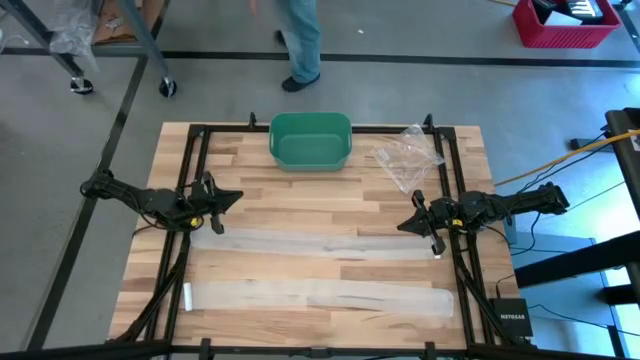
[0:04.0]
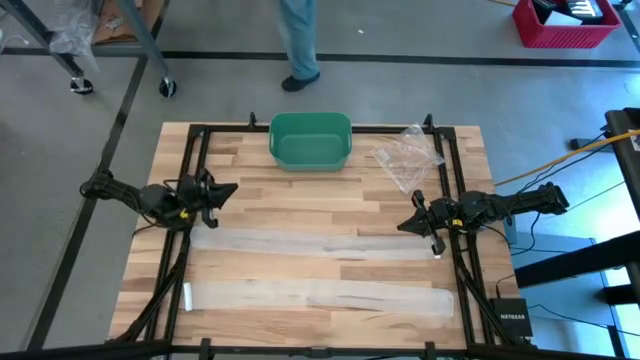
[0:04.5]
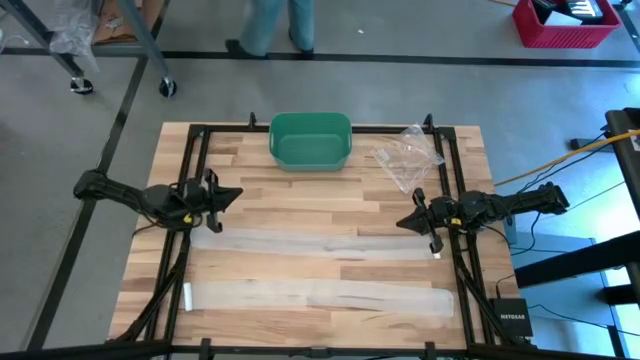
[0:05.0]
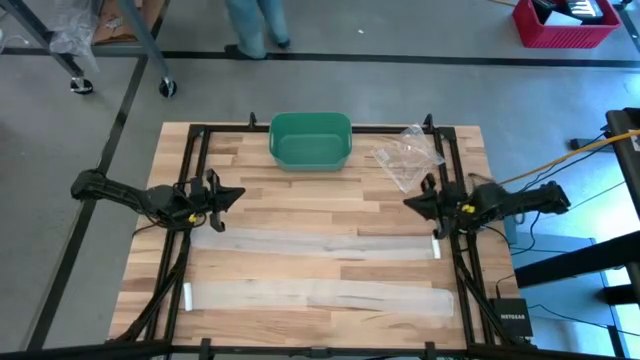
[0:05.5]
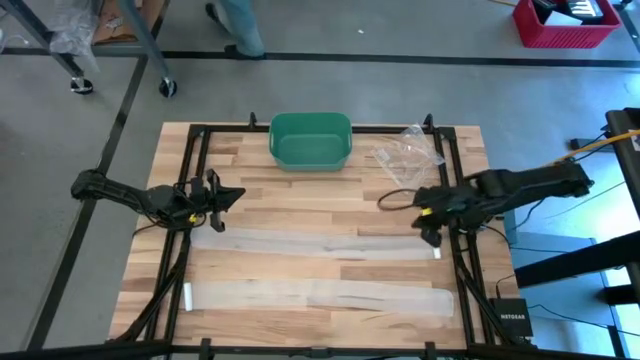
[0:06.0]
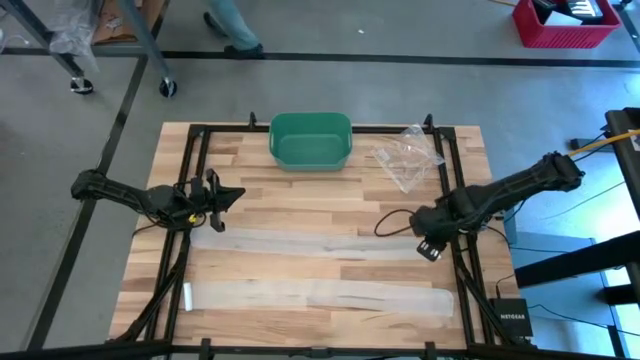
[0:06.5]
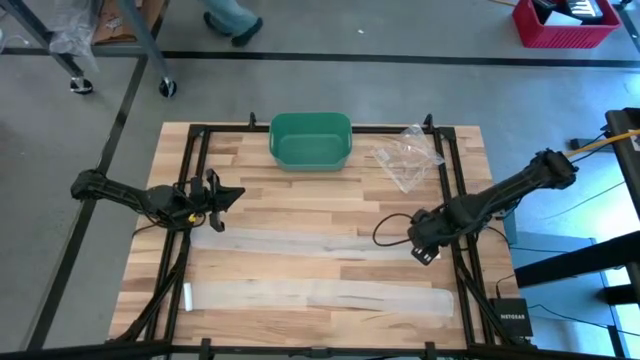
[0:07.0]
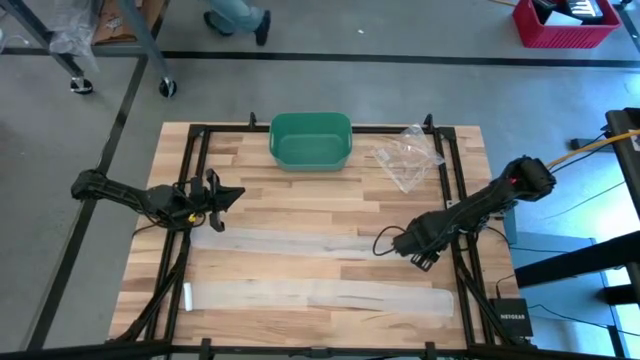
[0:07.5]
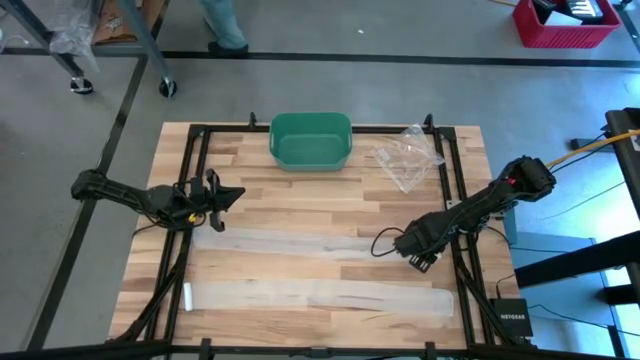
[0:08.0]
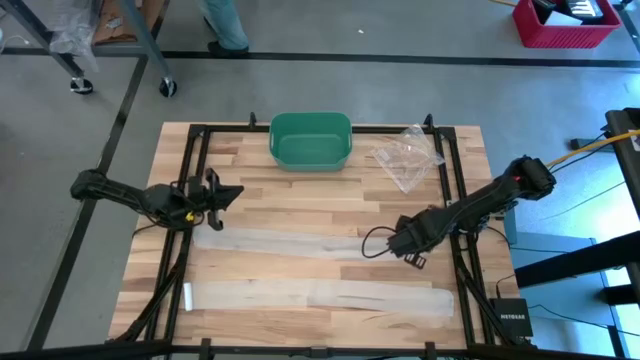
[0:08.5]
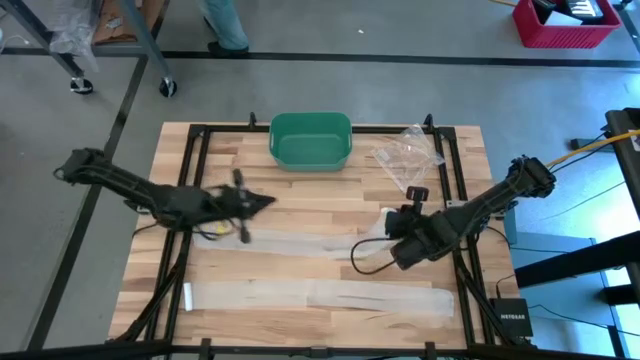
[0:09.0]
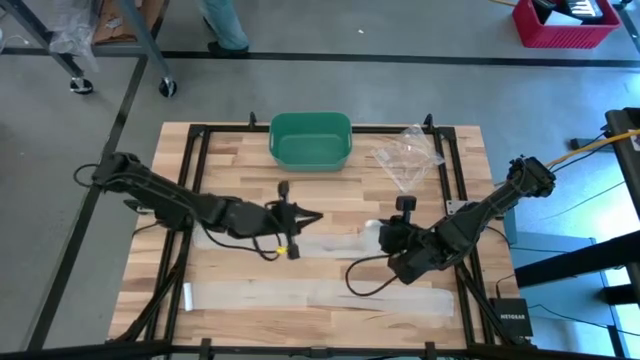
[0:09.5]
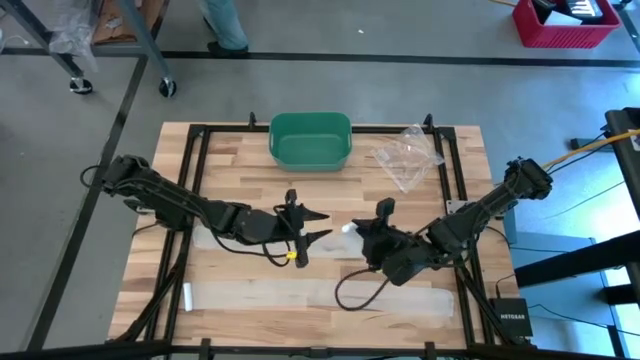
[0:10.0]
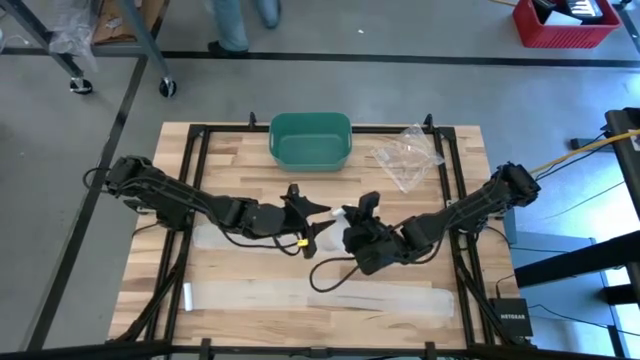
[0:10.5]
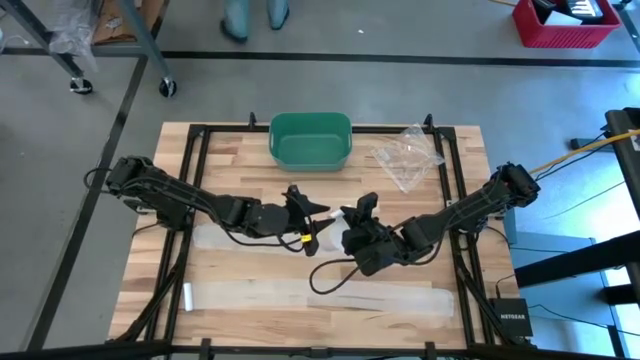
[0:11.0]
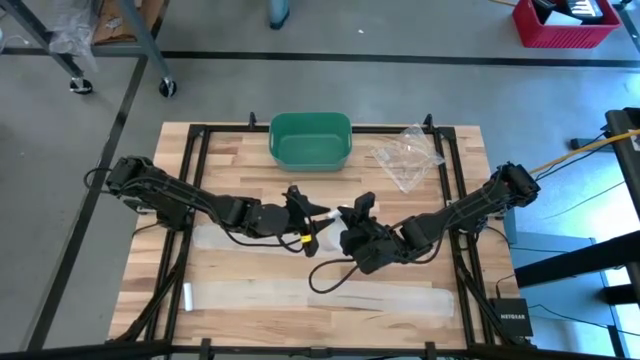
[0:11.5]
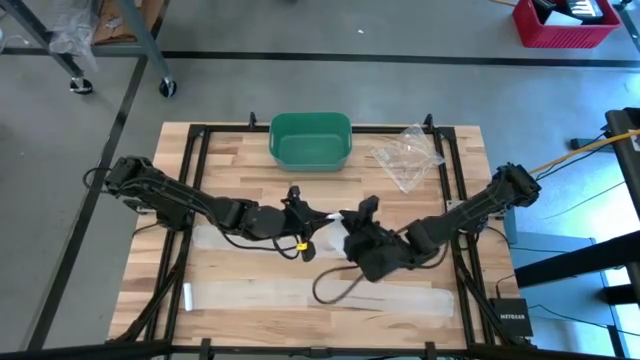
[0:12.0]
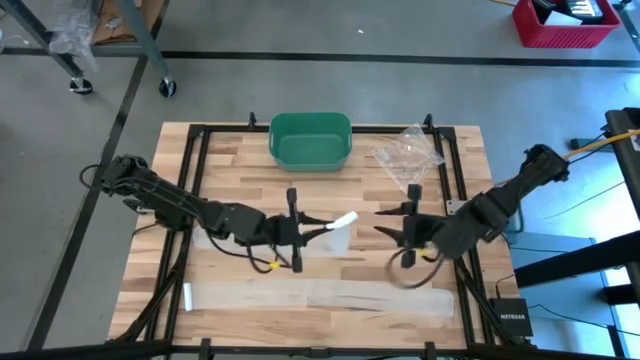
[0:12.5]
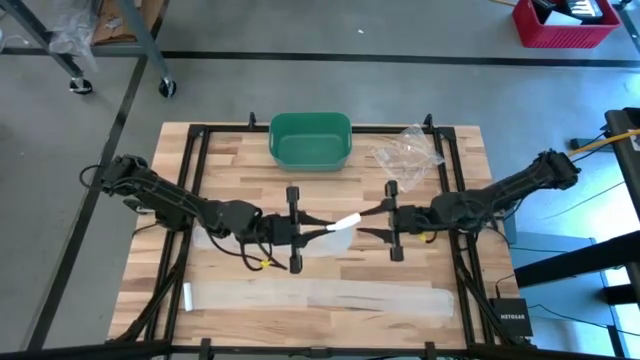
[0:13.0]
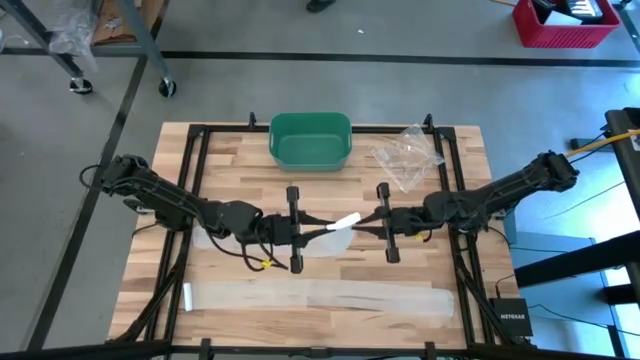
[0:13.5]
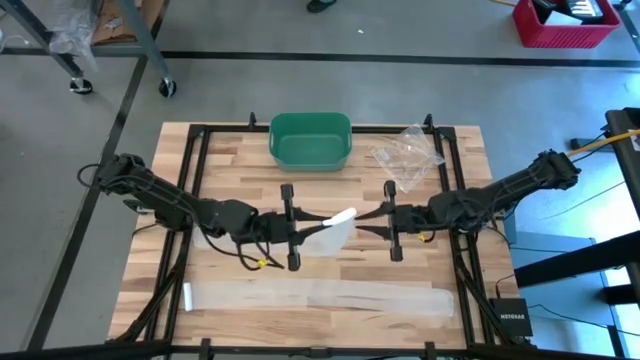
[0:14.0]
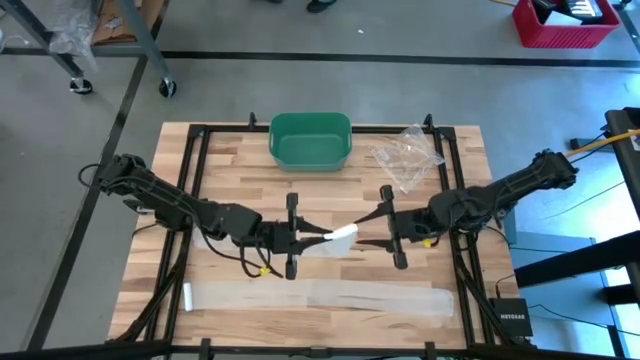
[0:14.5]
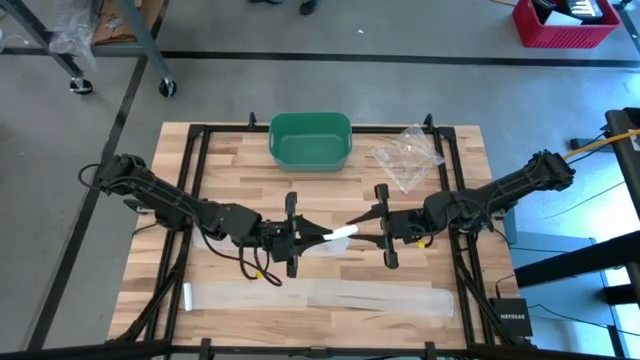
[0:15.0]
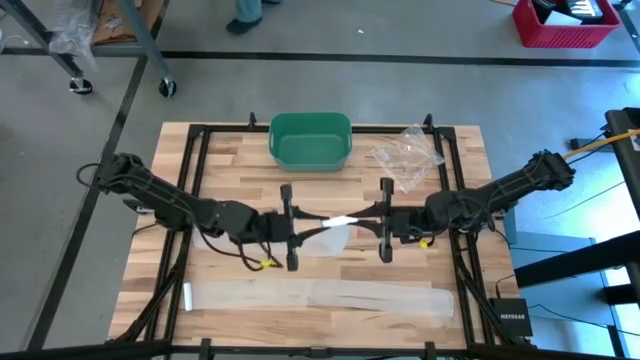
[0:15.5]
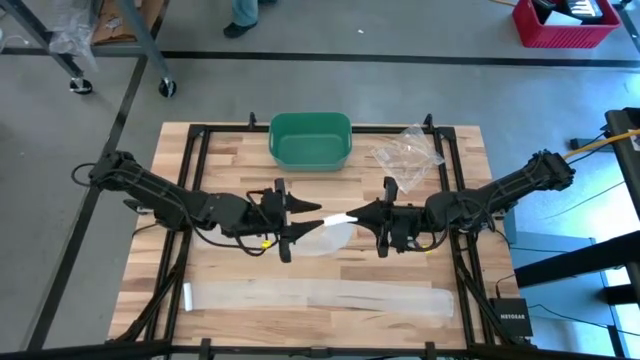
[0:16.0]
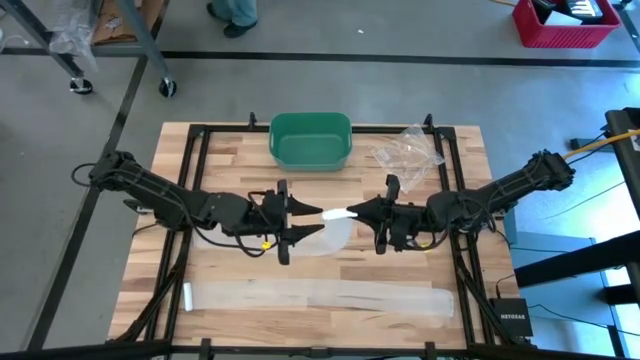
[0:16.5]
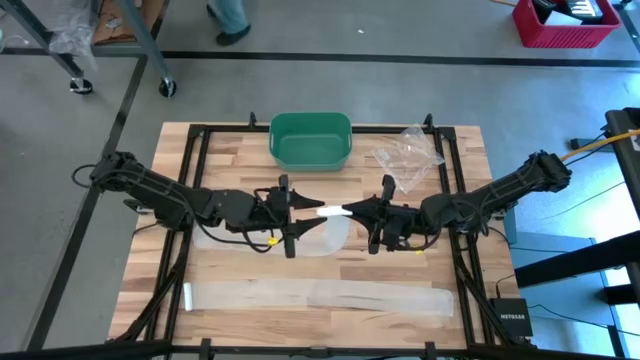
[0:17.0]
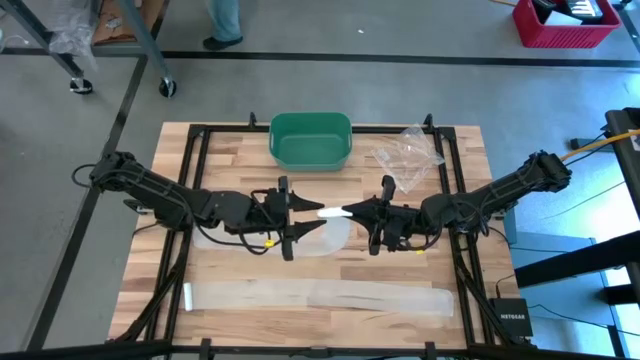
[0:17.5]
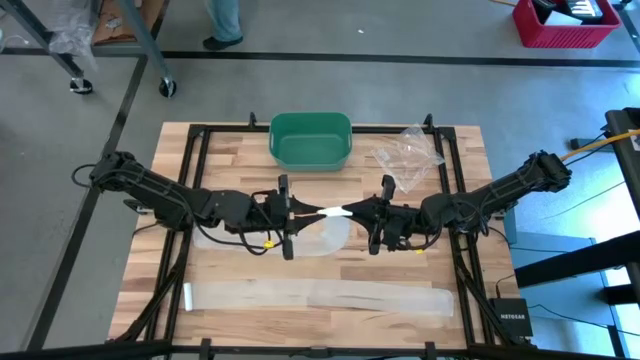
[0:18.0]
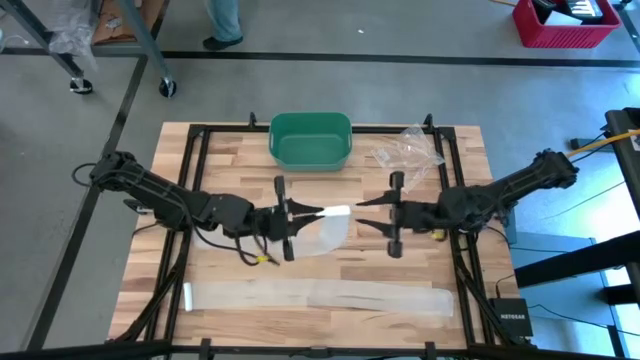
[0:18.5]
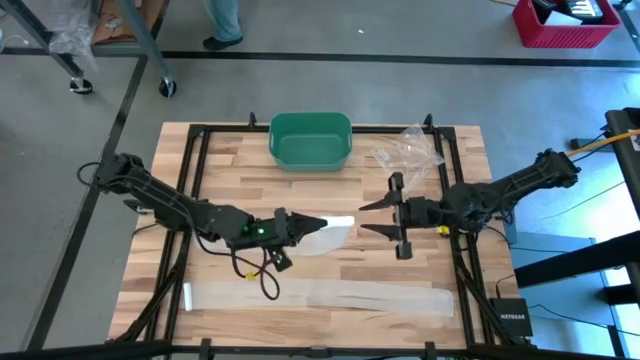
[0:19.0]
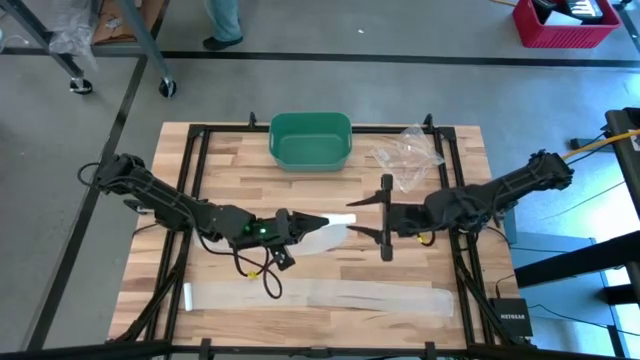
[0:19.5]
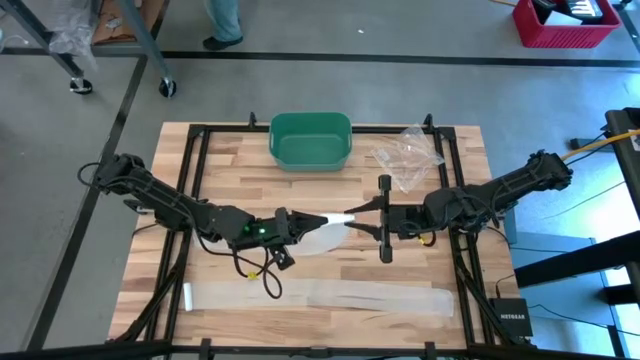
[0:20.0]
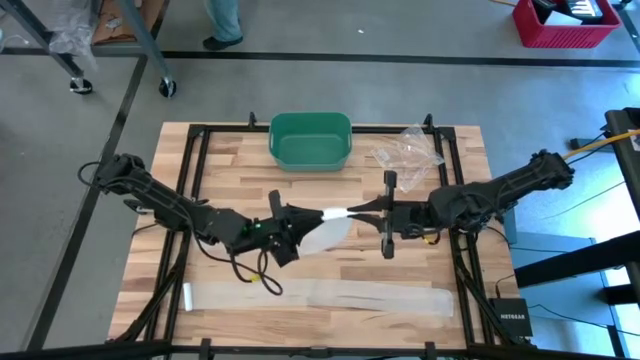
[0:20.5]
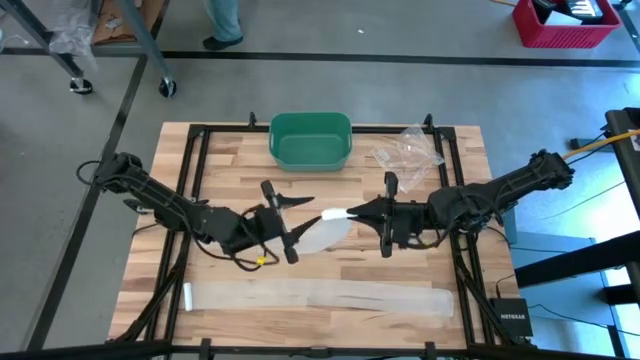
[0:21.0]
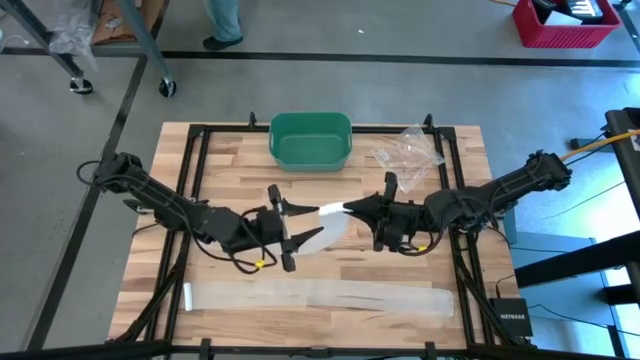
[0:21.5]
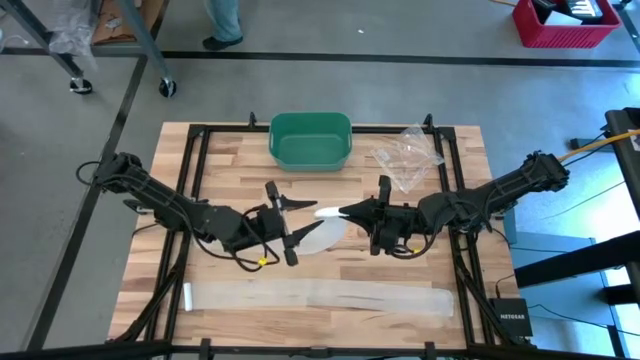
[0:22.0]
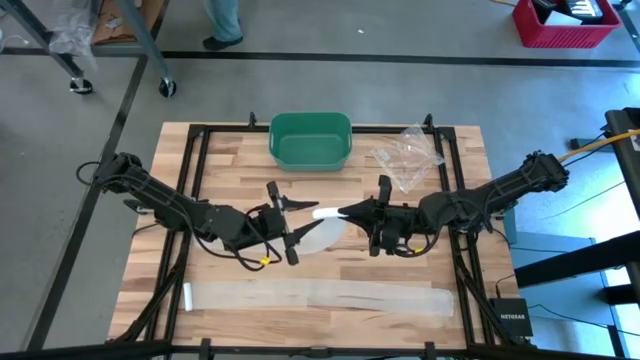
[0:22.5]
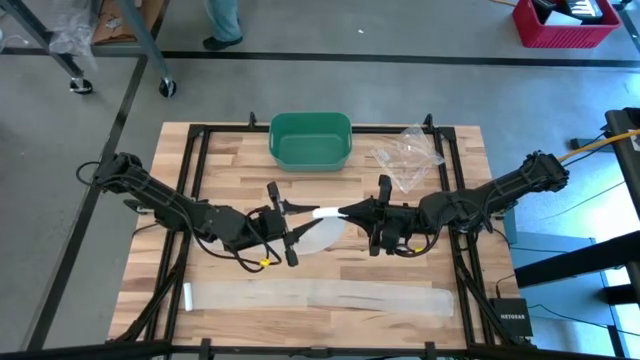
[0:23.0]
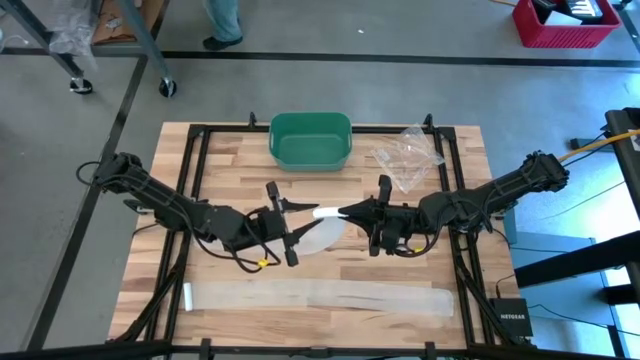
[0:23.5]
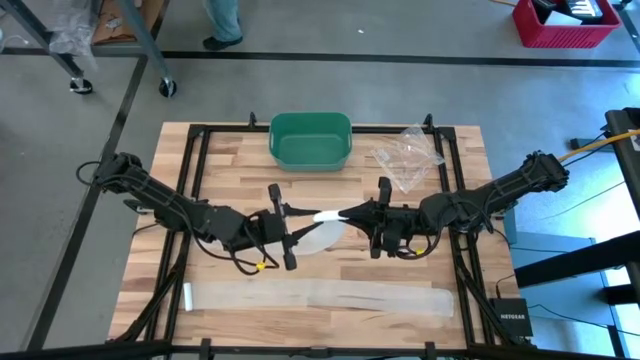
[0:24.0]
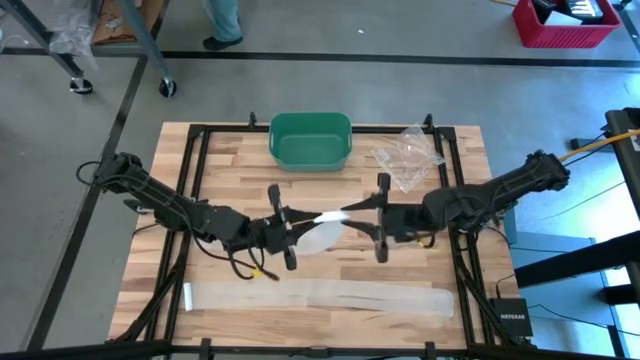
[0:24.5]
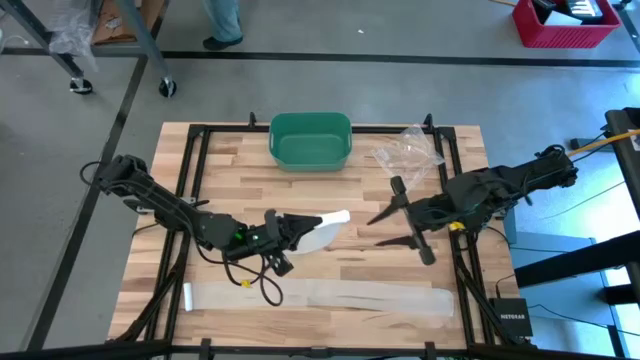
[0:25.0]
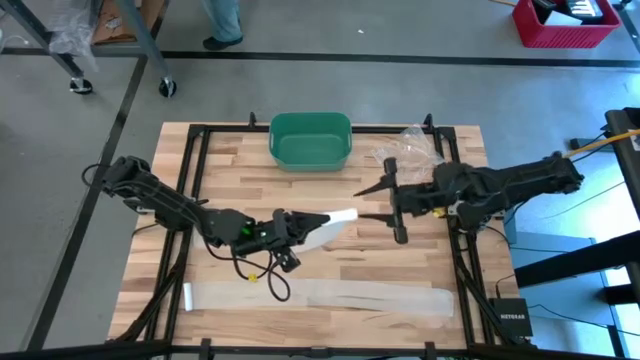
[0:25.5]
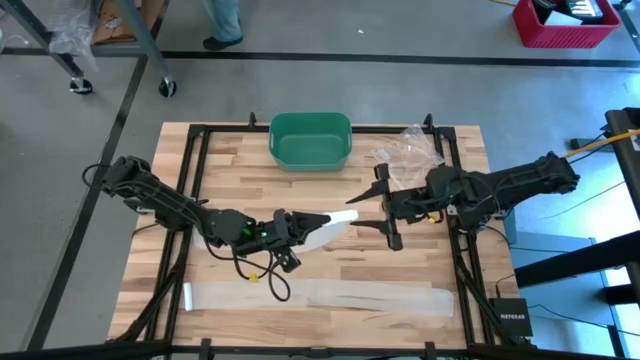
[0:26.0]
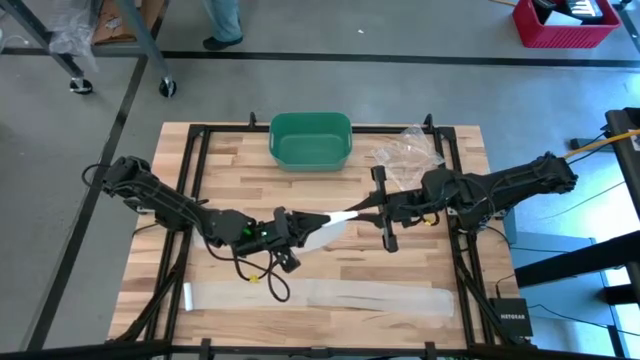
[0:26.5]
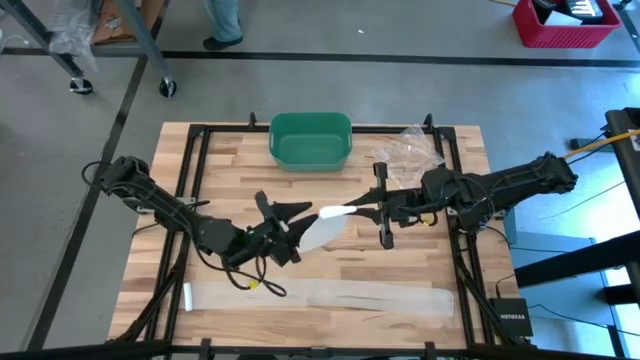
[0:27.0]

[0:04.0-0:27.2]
Task: Roll bandage
Roll the top white bandage
